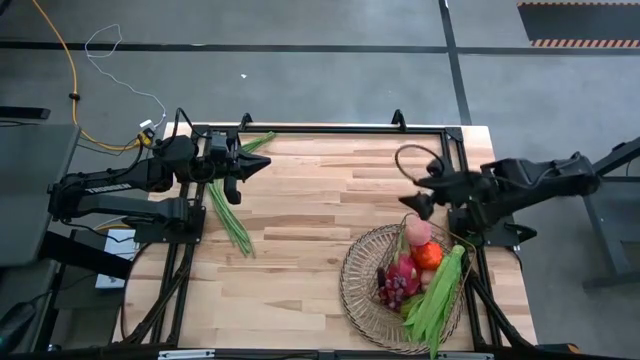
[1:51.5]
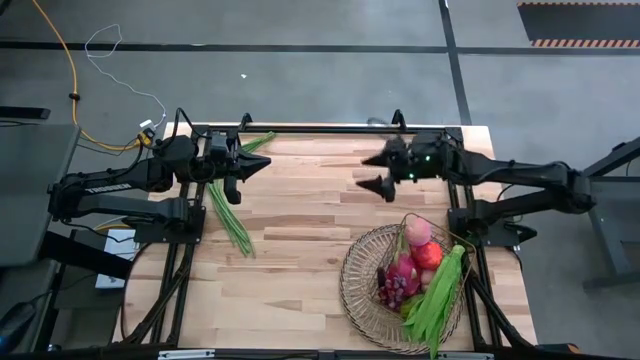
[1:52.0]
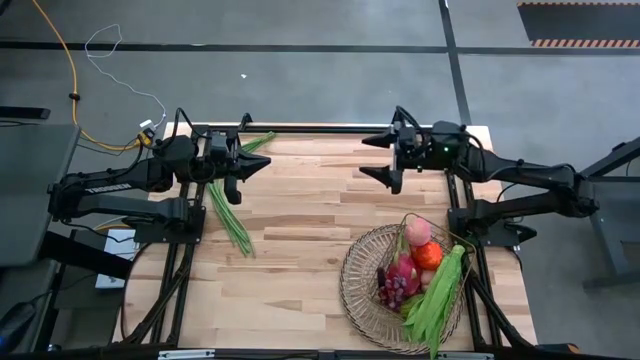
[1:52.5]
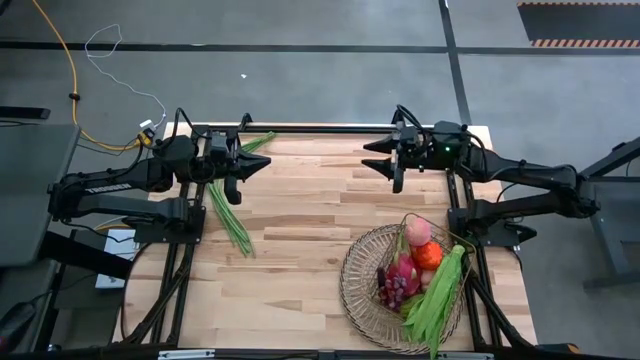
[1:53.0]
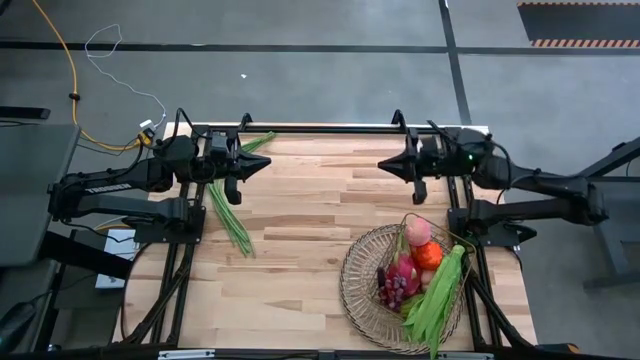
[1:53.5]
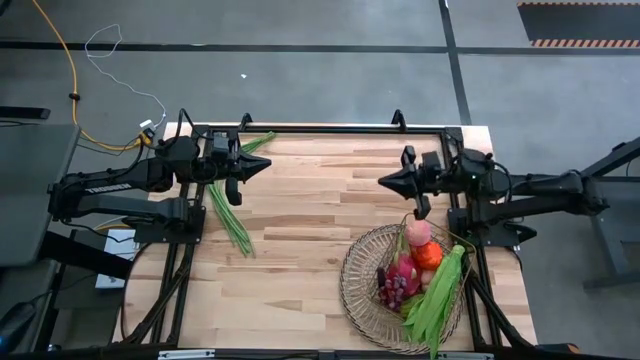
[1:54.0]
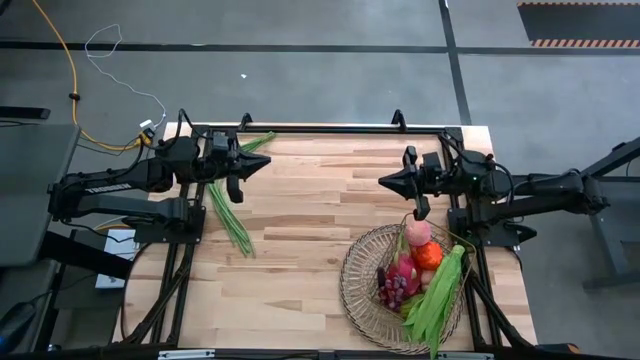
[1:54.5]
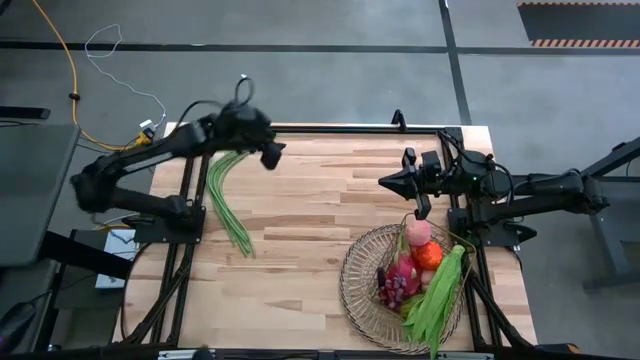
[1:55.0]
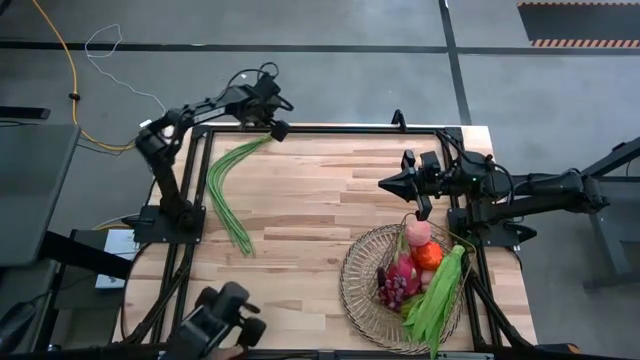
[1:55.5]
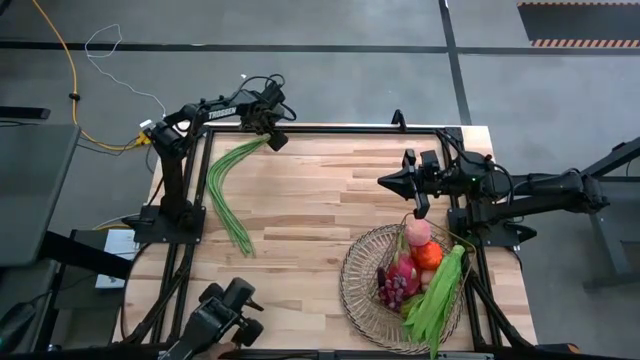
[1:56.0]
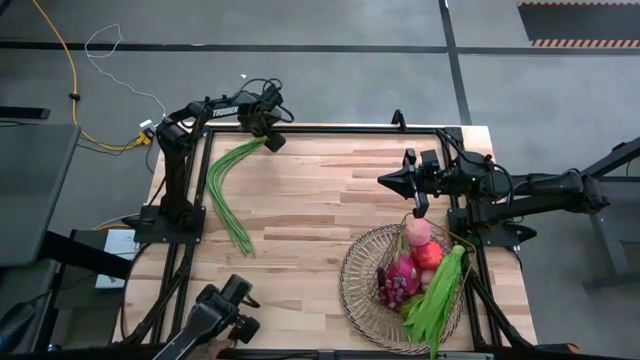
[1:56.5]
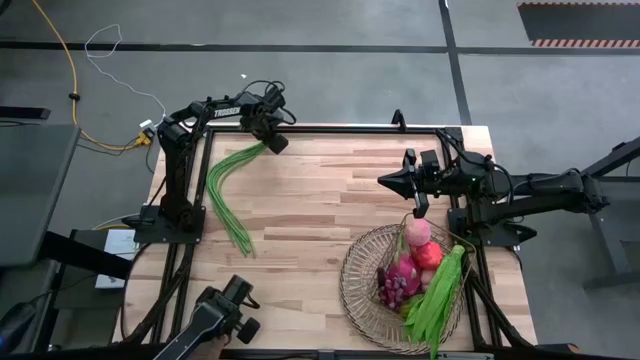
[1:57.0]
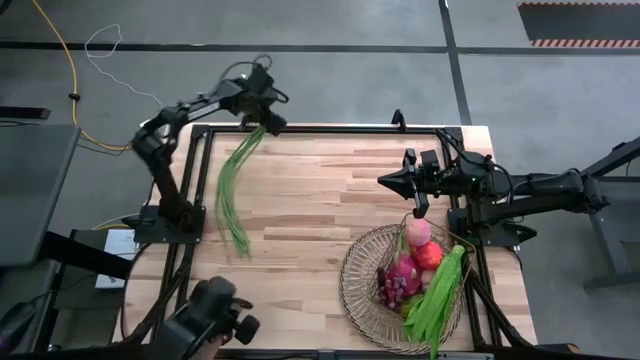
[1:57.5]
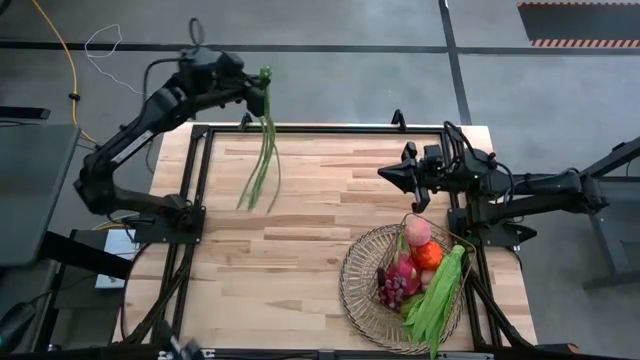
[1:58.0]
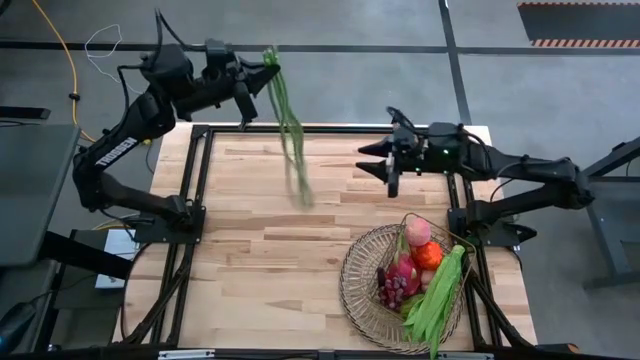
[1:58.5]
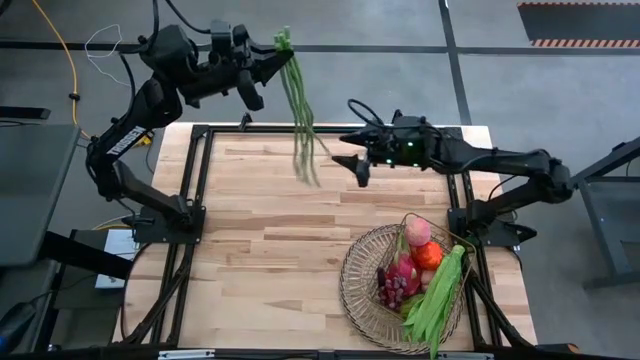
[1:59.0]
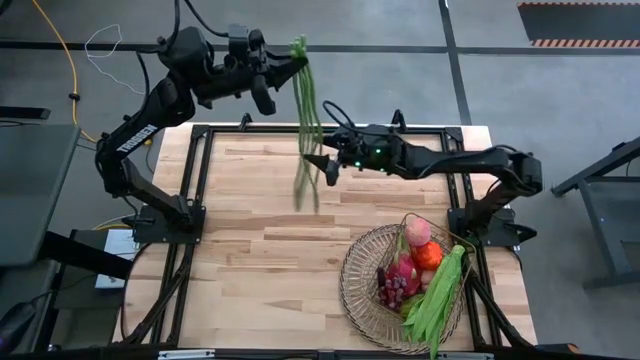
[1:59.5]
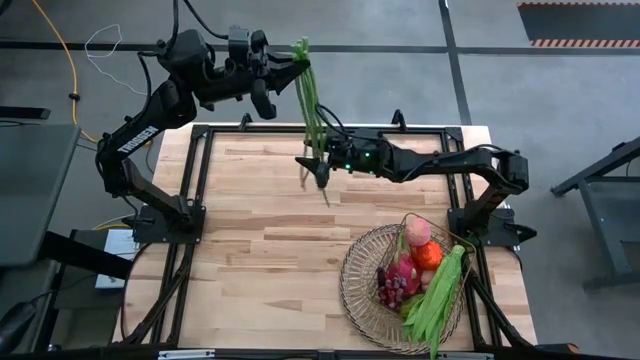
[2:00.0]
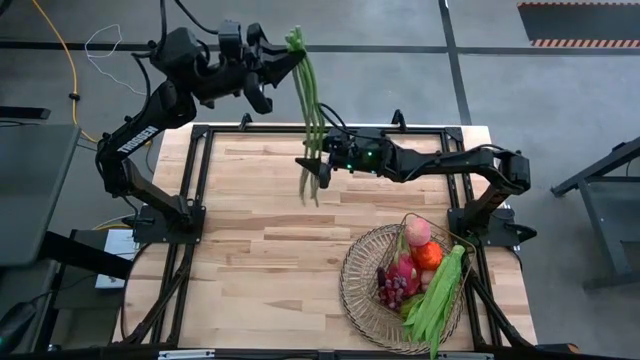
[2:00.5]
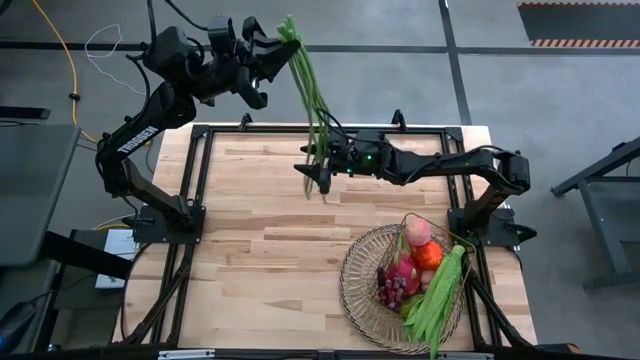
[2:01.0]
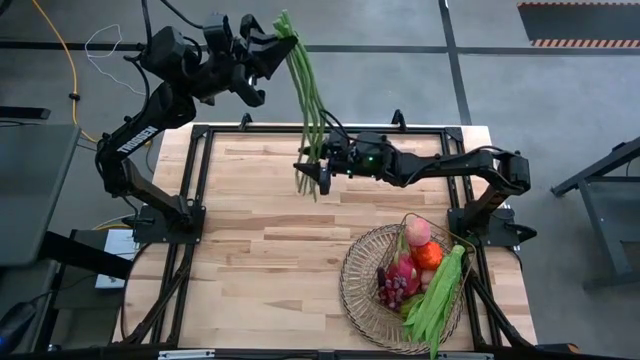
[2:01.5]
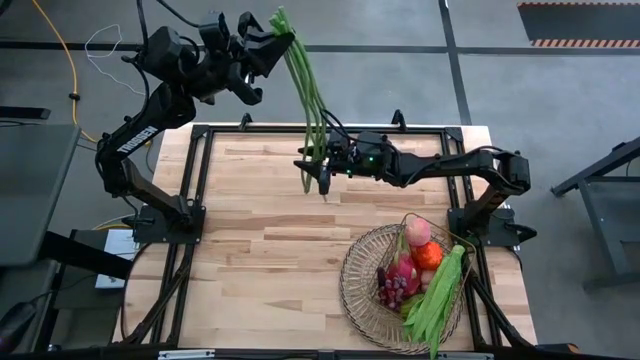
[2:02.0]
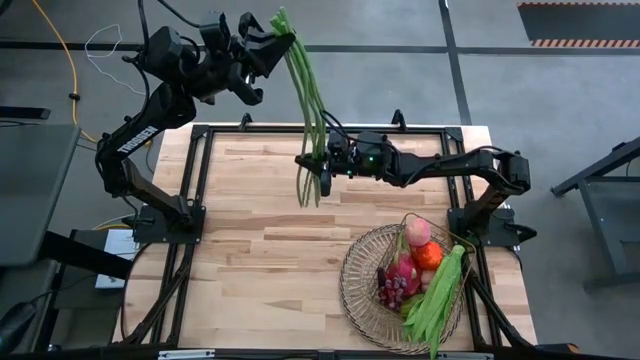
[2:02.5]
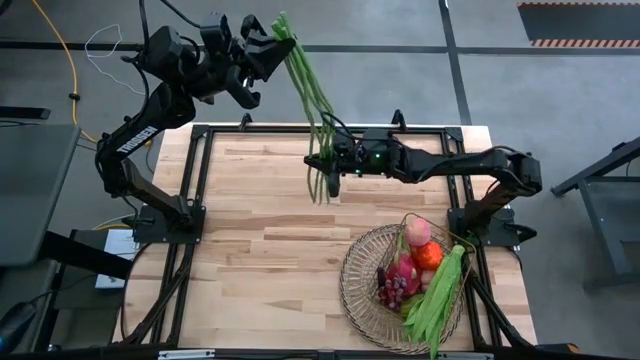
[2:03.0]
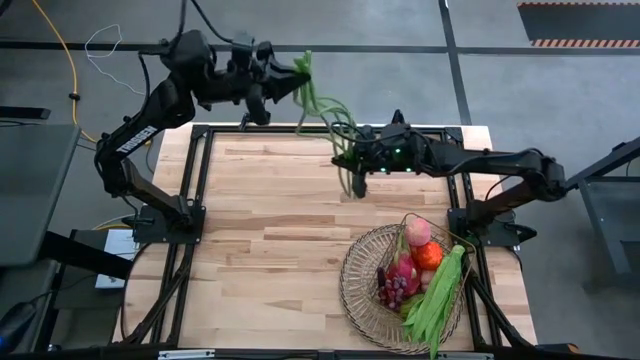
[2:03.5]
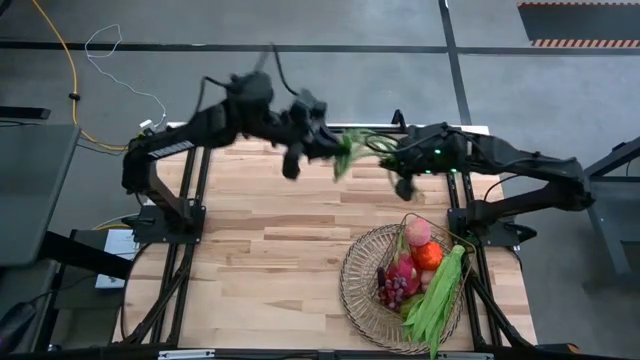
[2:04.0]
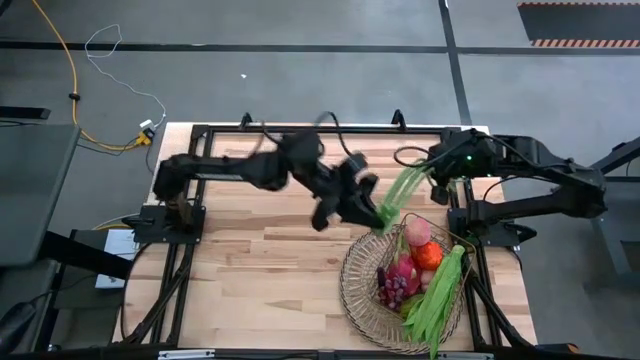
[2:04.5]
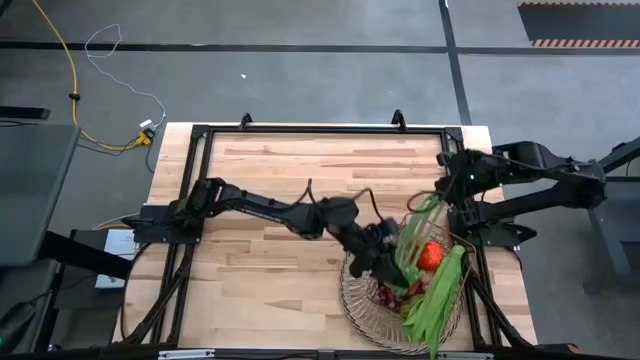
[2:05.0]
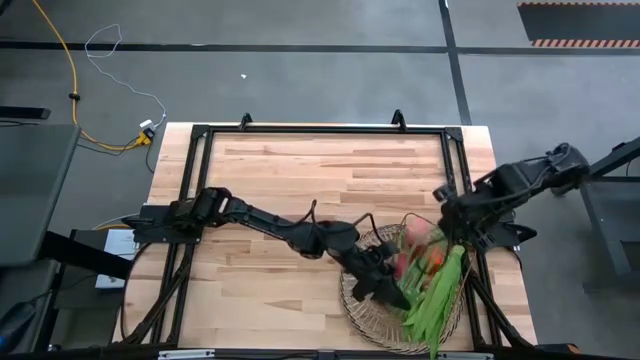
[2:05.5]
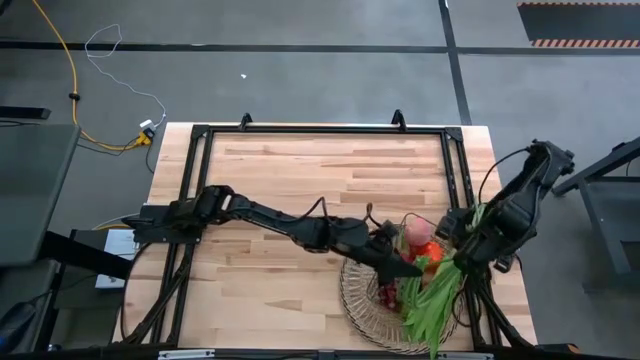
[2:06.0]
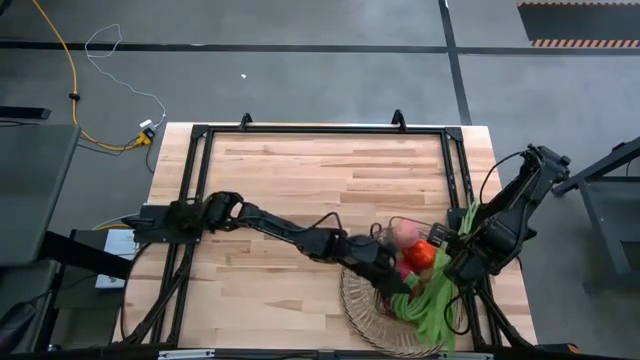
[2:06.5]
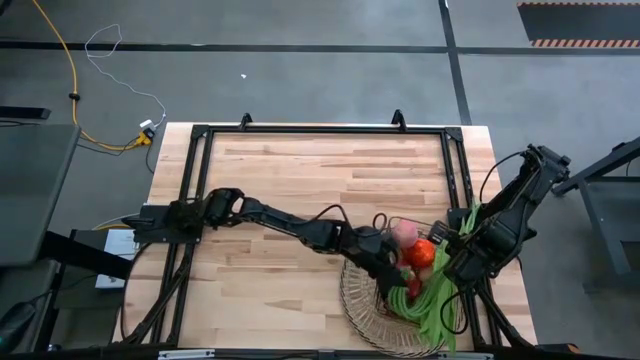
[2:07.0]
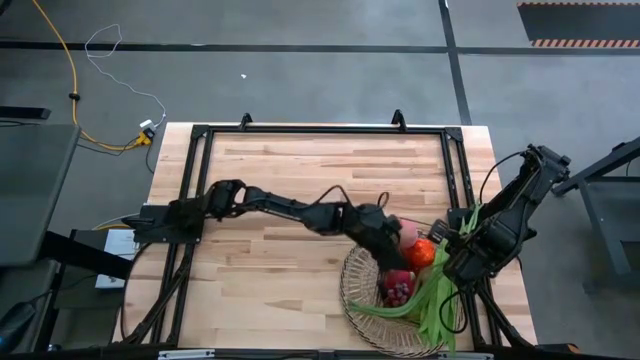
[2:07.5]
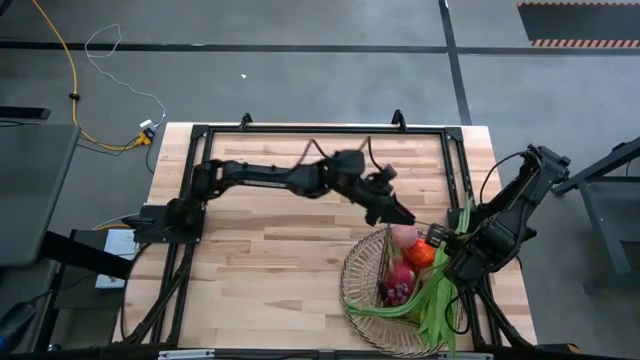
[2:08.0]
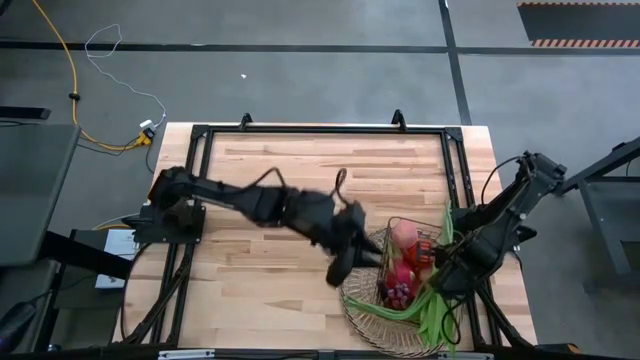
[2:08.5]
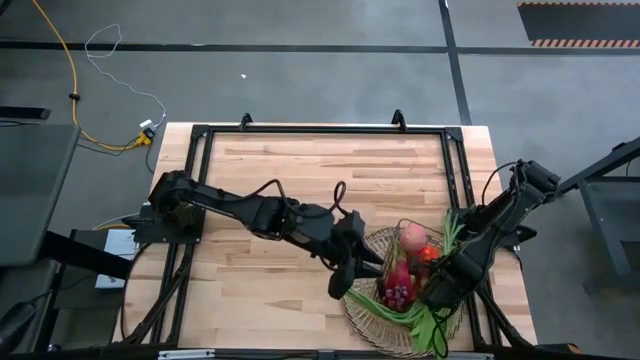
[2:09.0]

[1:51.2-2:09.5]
Task: Build produce basket
Put the green beans into the wire basket

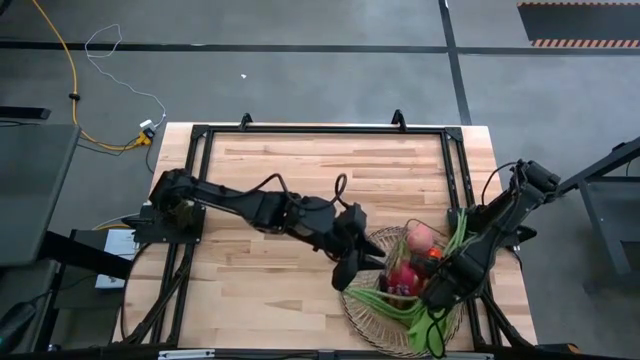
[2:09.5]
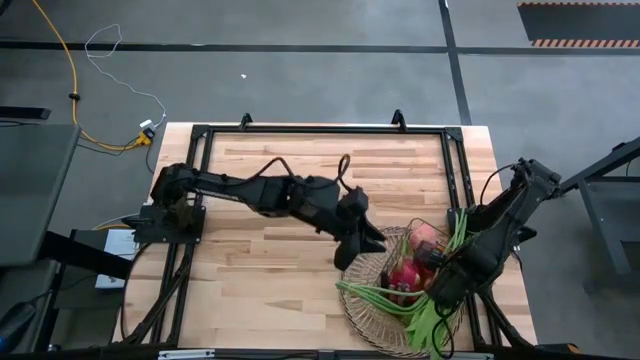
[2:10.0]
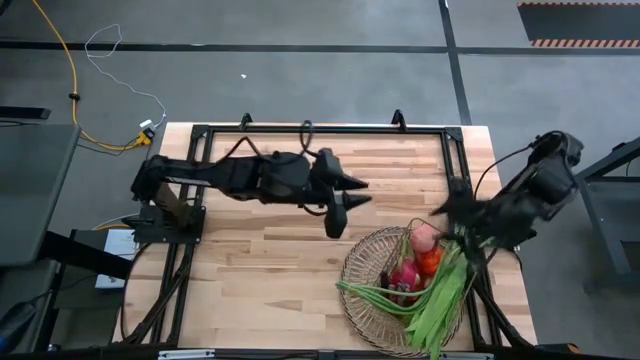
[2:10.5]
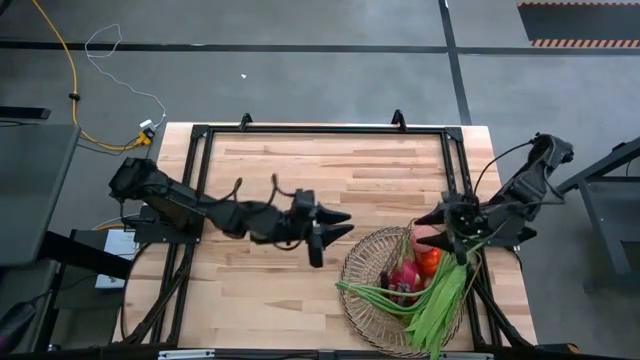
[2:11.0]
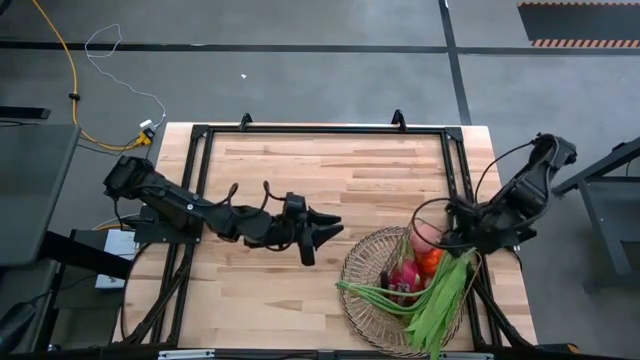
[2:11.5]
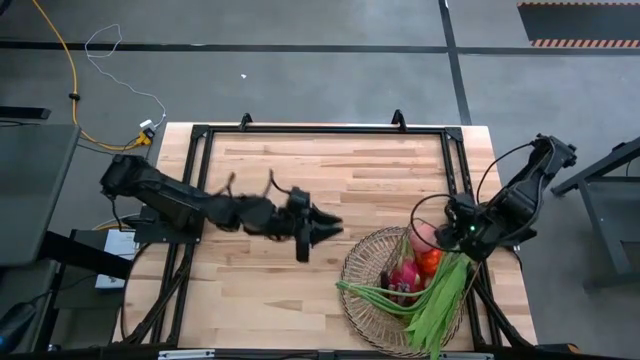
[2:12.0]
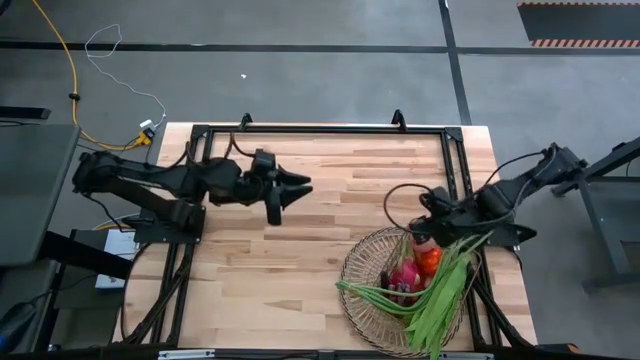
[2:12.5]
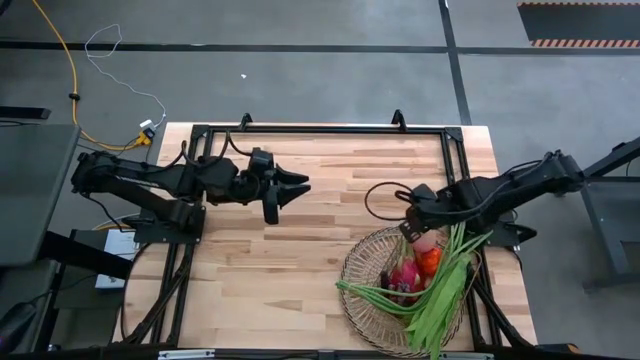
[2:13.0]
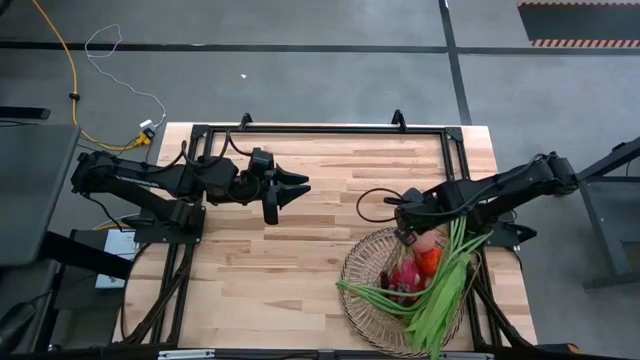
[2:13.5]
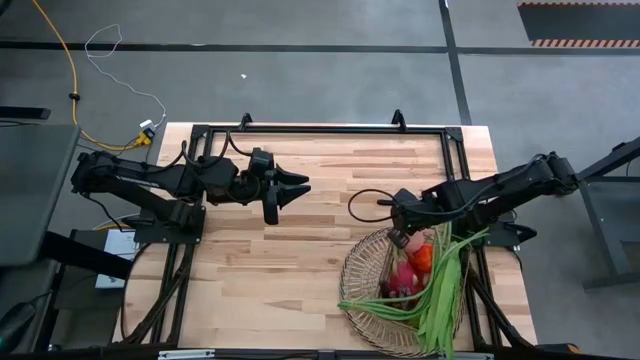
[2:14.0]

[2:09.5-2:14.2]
Adjust the wire basket on the table
